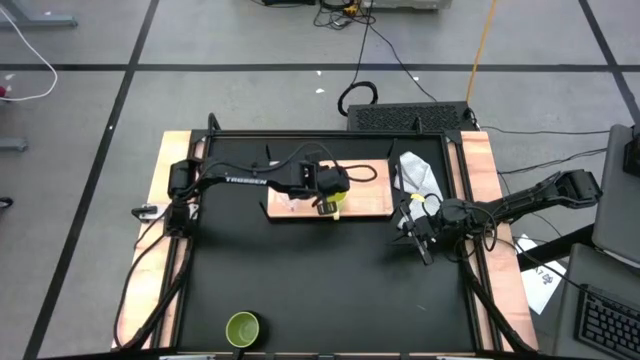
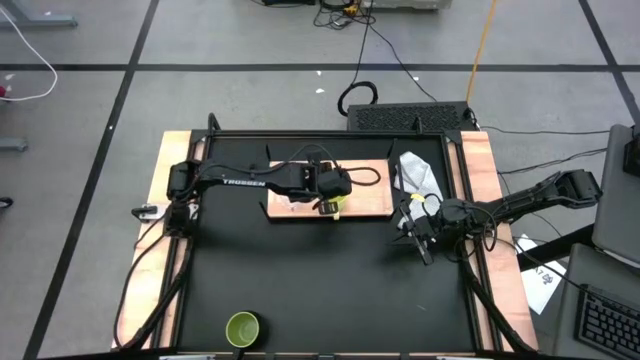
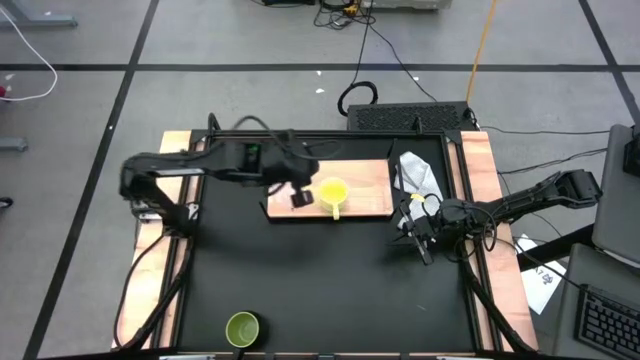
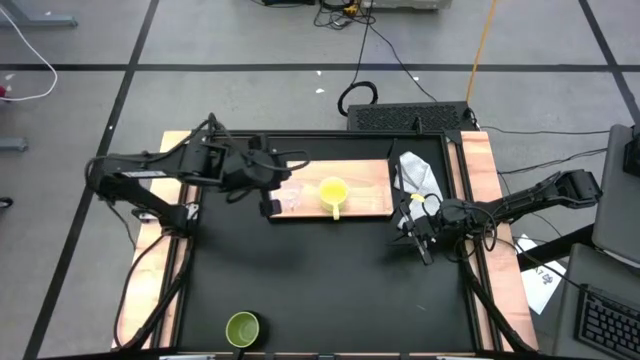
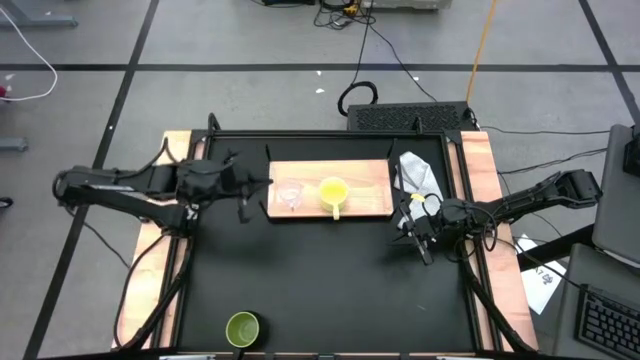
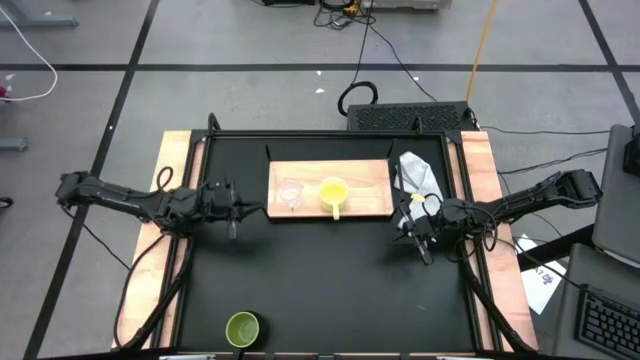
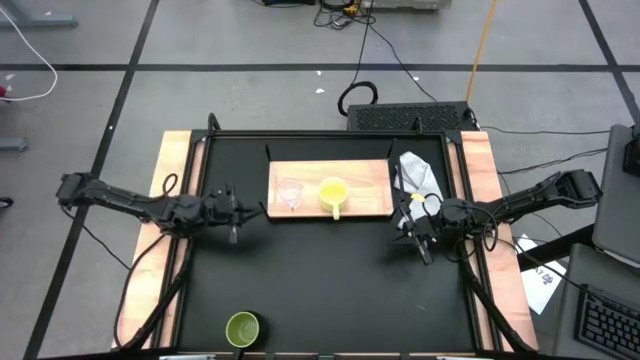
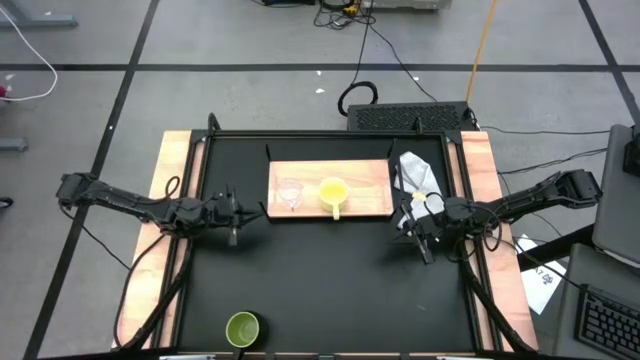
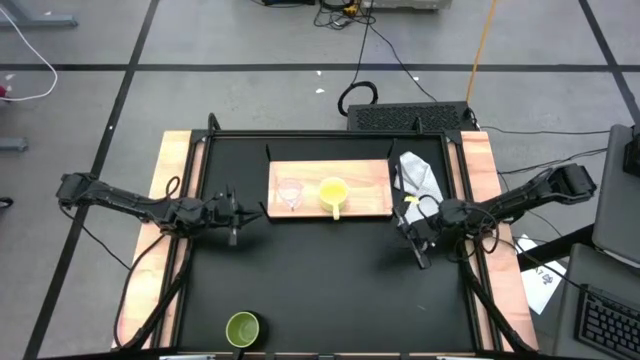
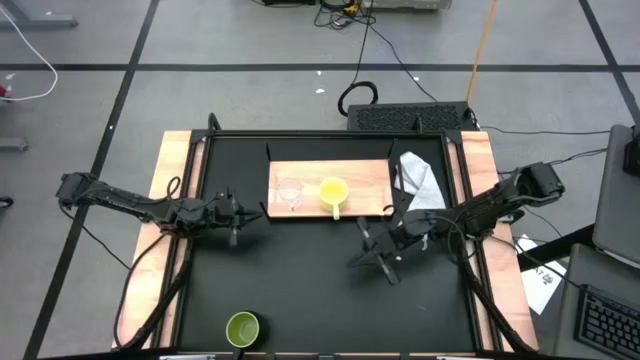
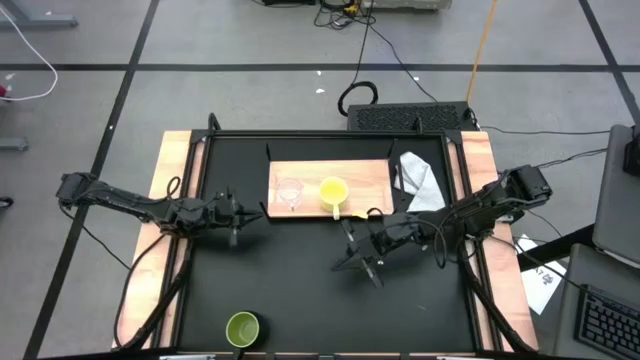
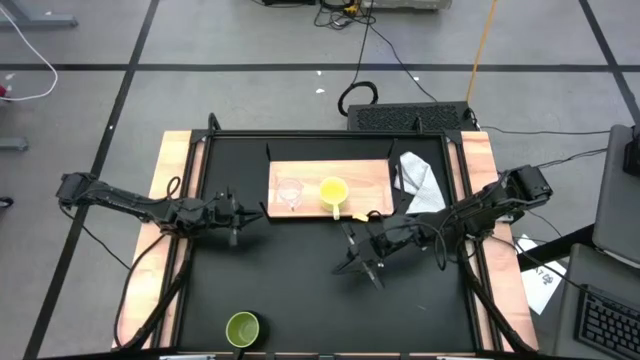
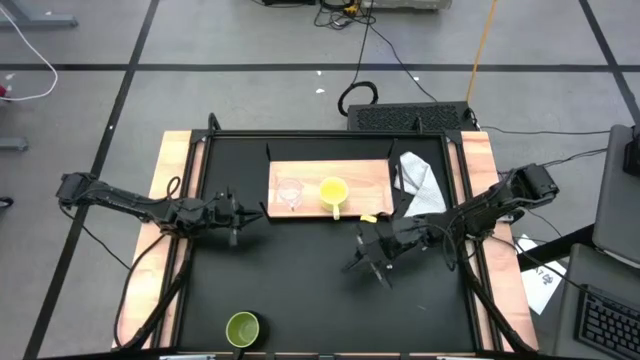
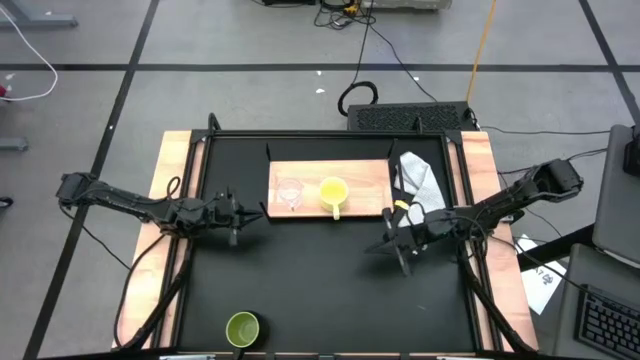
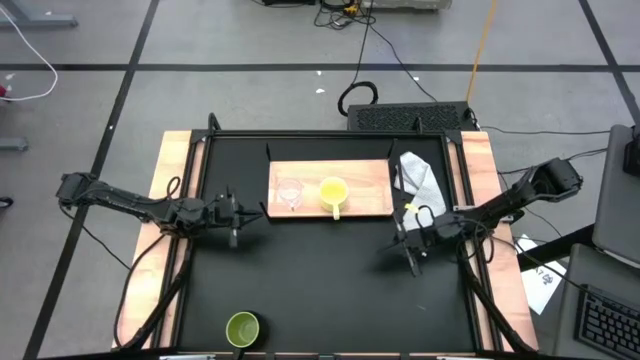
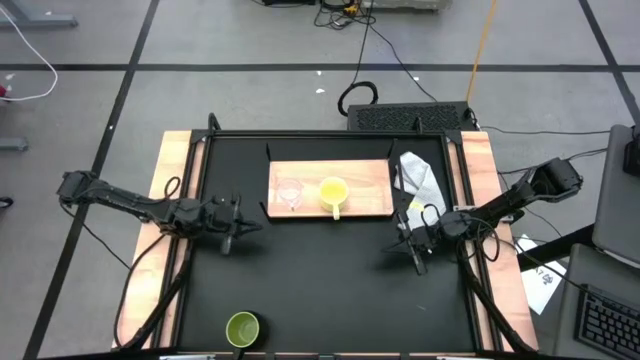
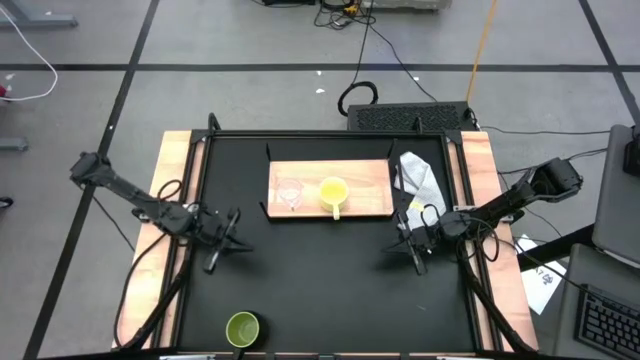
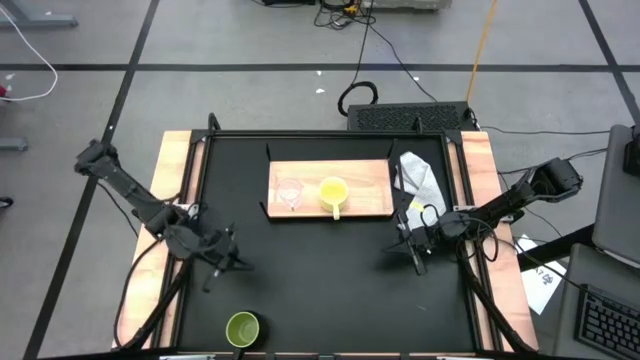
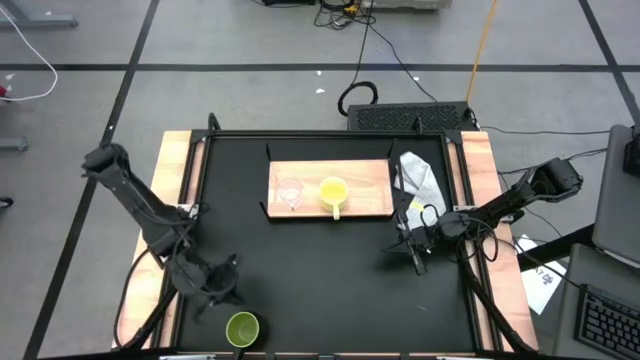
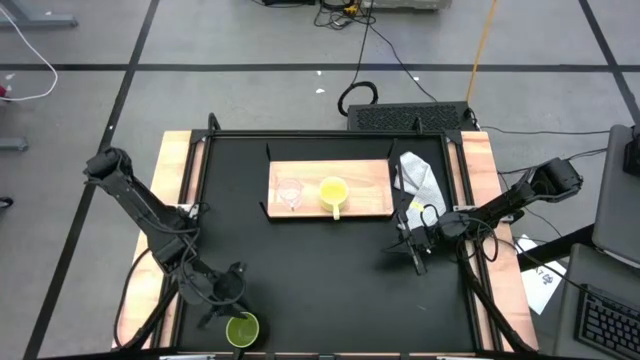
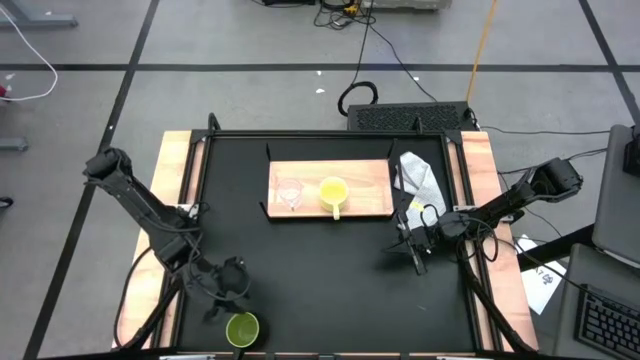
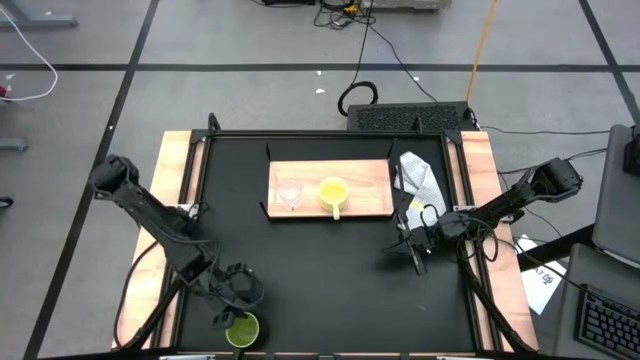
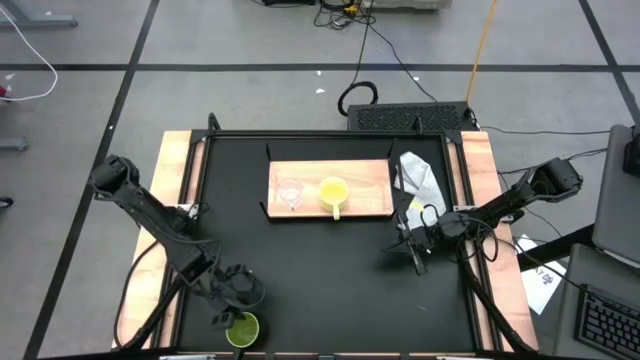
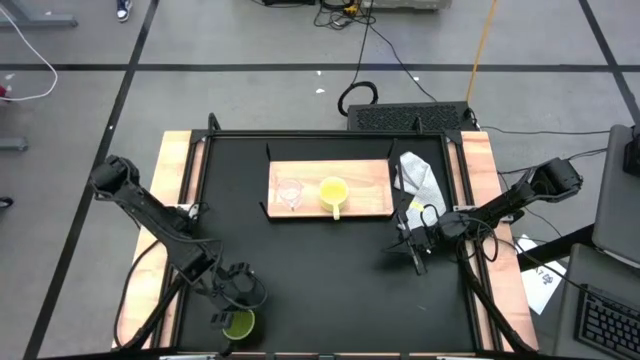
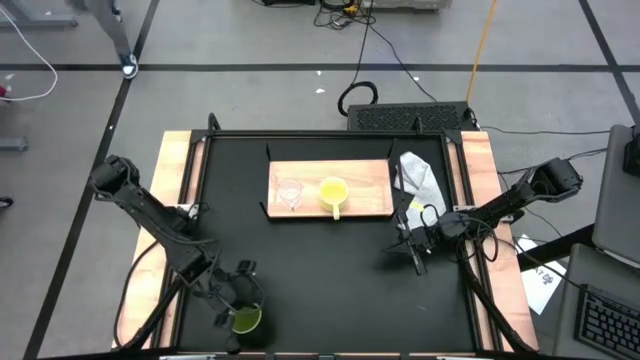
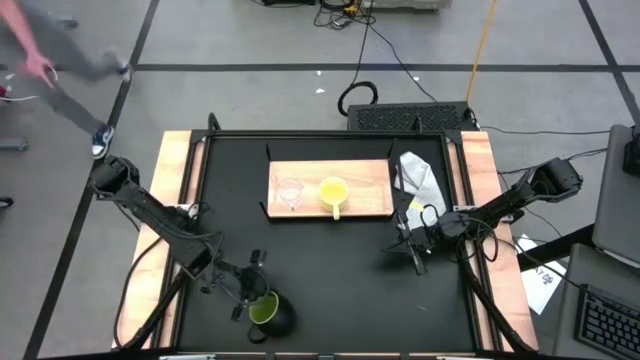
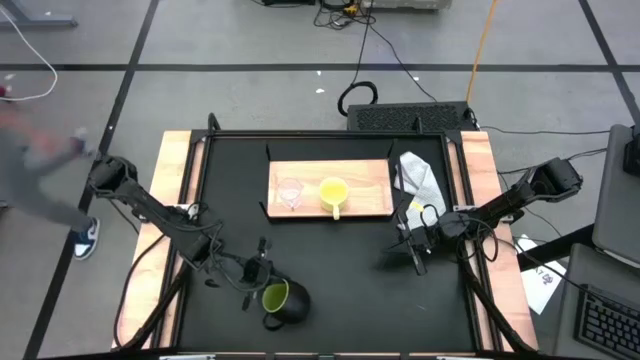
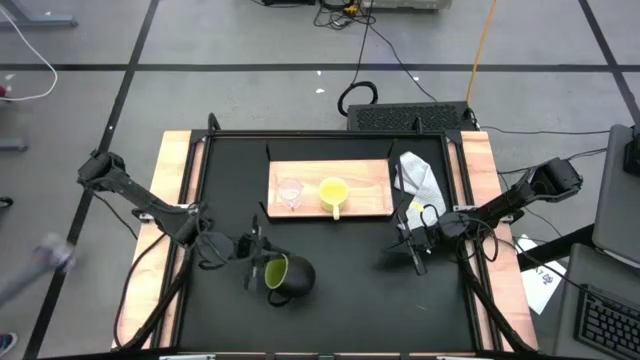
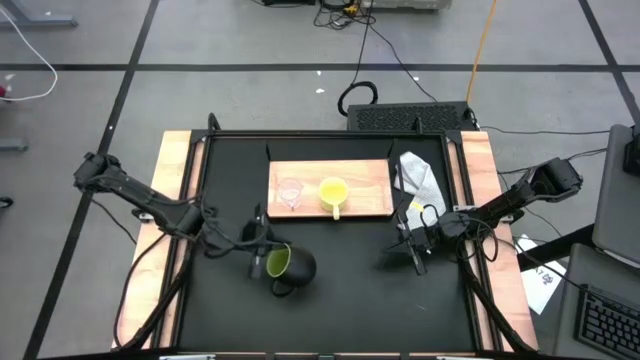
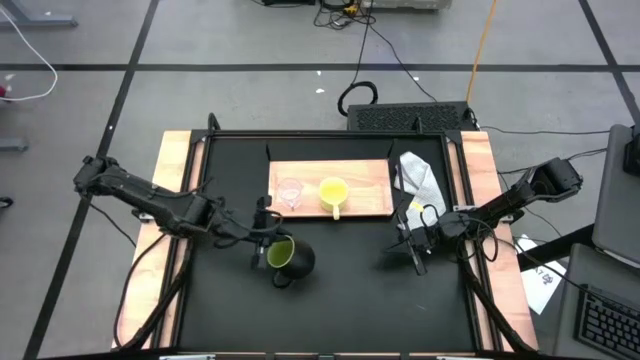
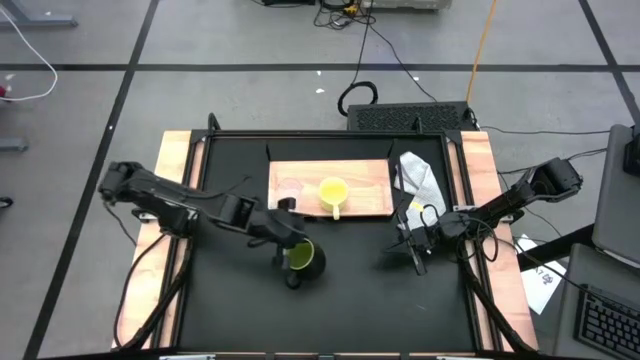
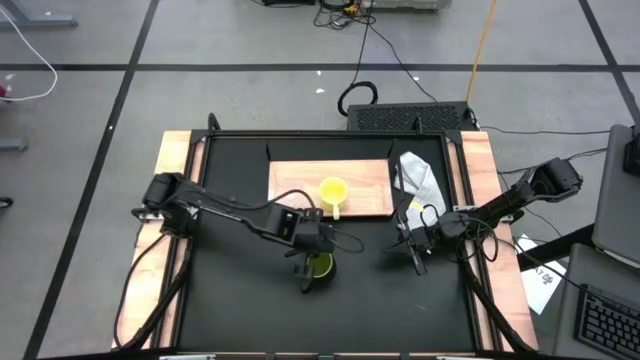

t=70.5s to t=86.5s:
Task: Stack small to large cups/mugs on shelf
Put the black mug on the shelf

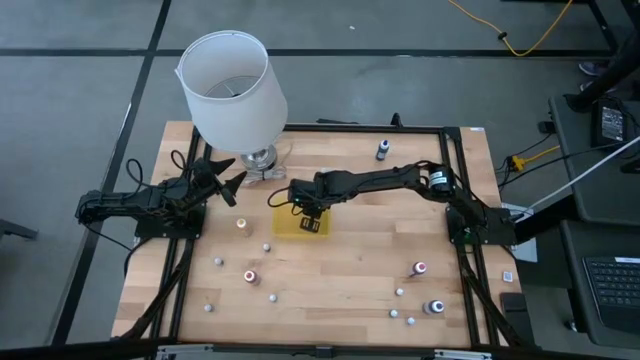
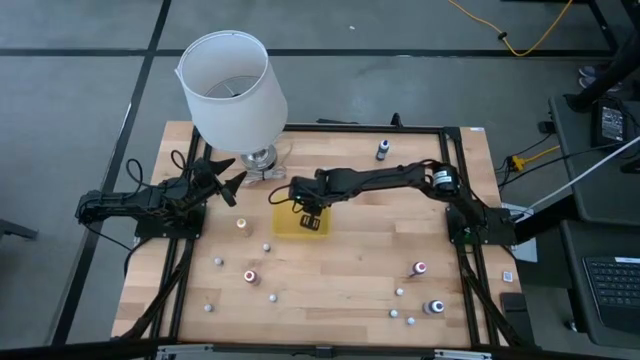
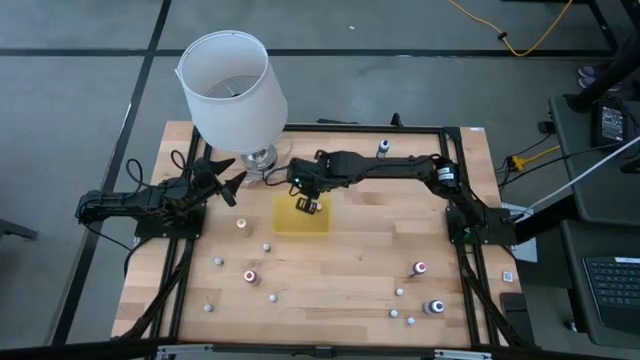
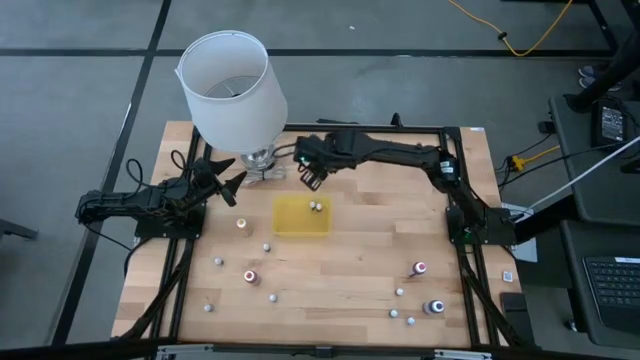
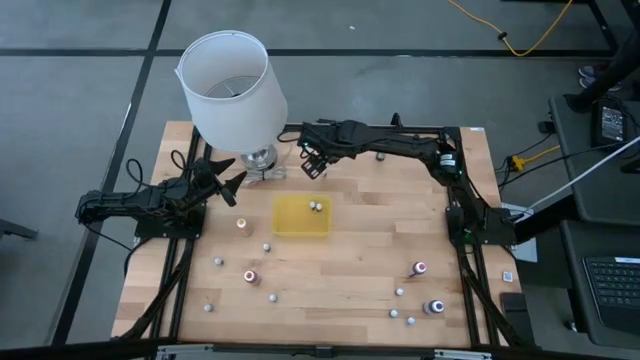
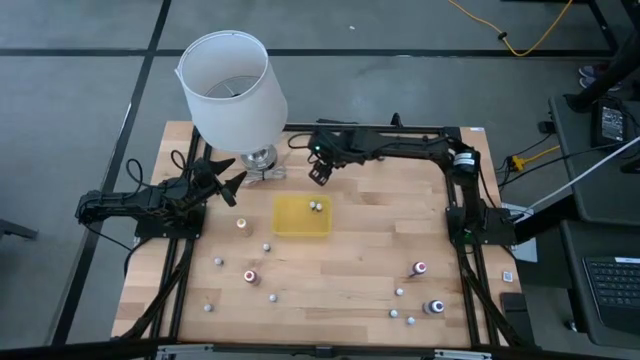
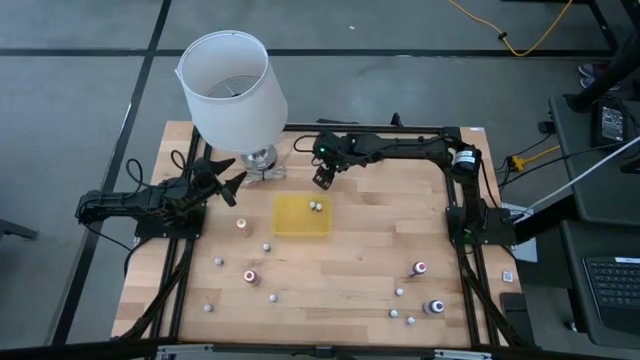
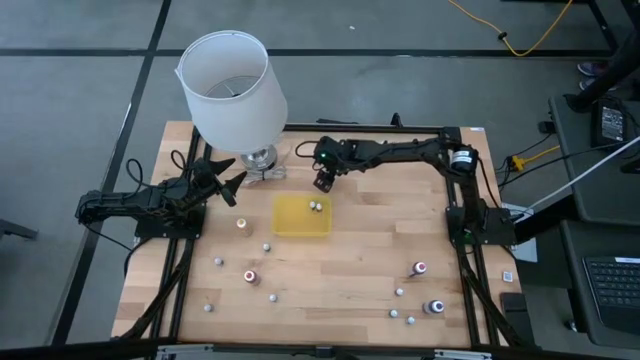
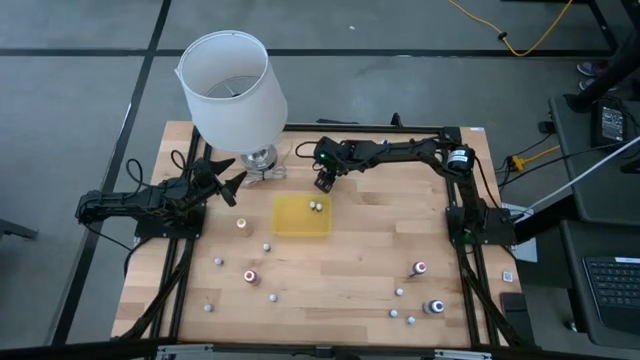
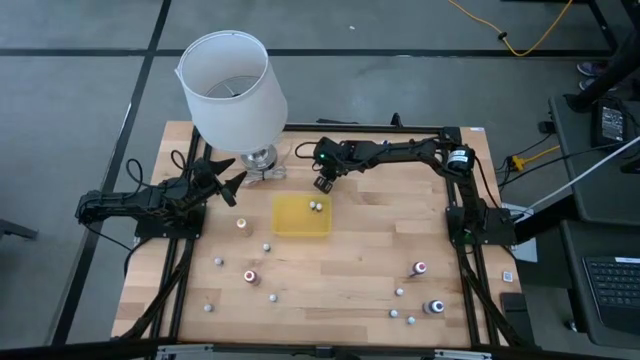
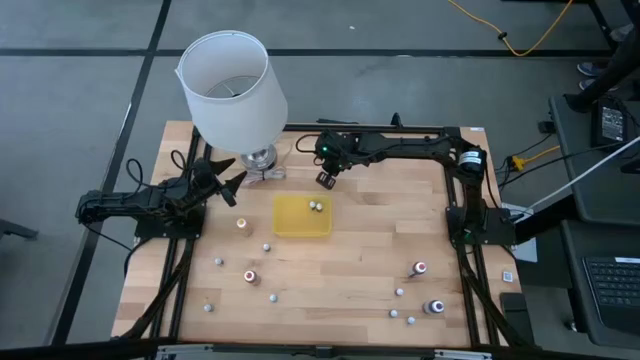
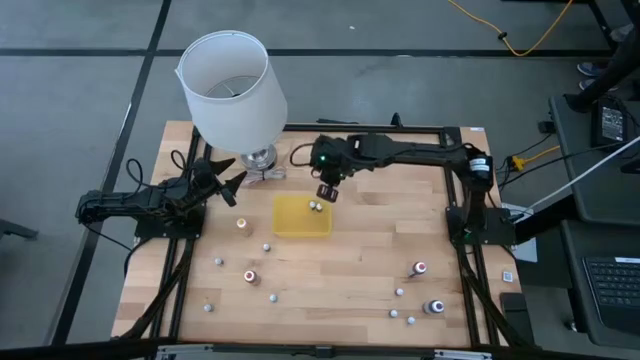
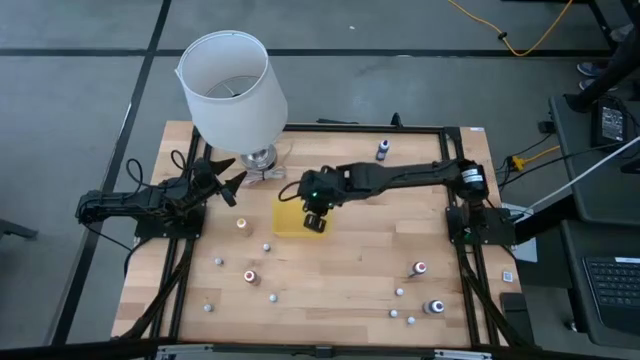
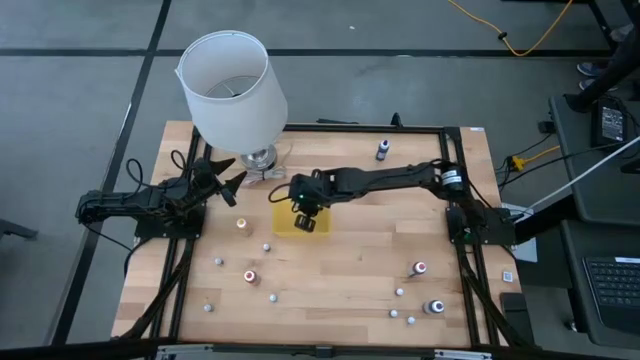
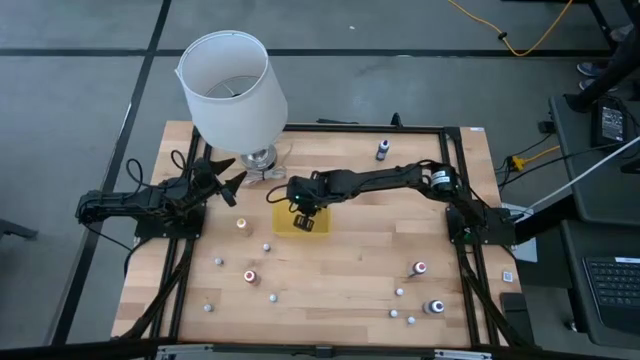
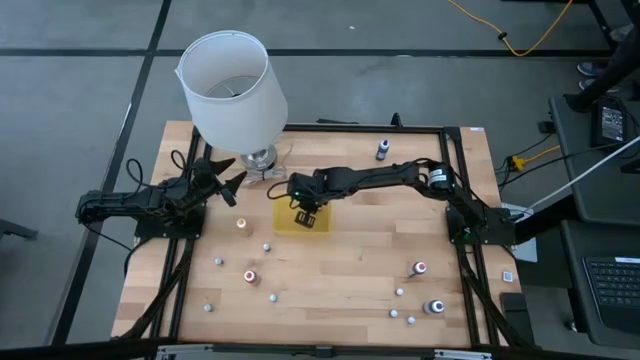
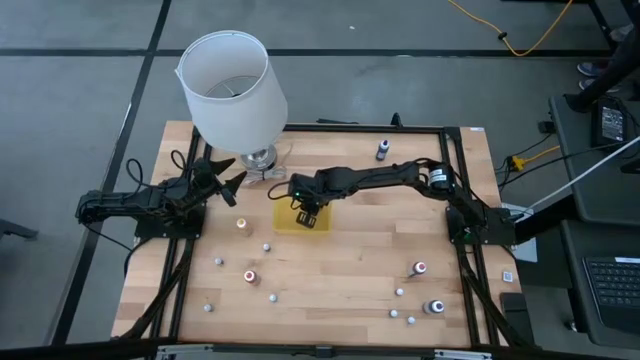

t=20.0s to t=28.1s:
Task: Pick & Place food coloring
Put the red food coloring bottle into the yellow bin
